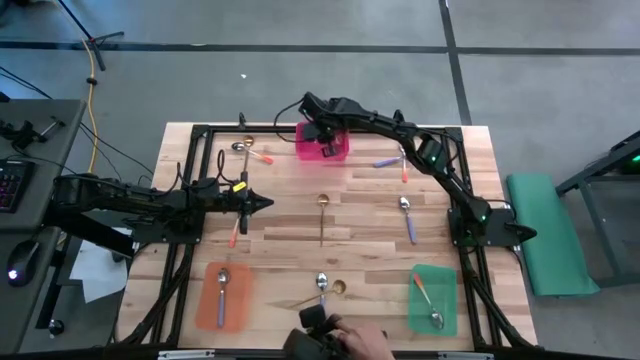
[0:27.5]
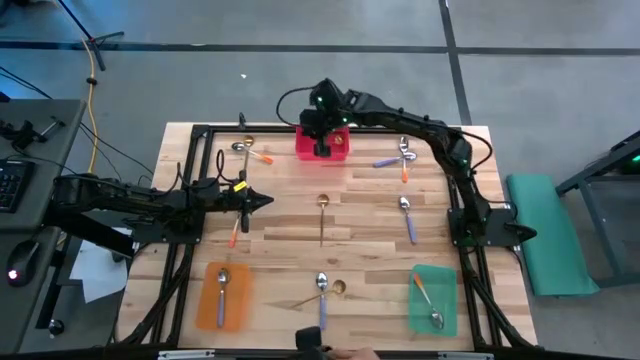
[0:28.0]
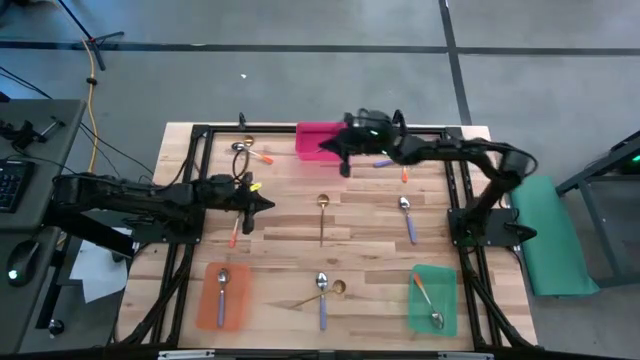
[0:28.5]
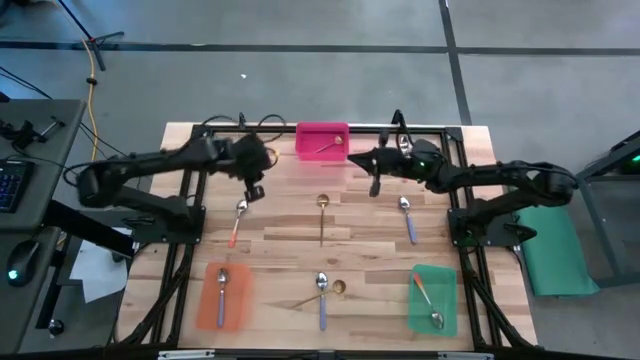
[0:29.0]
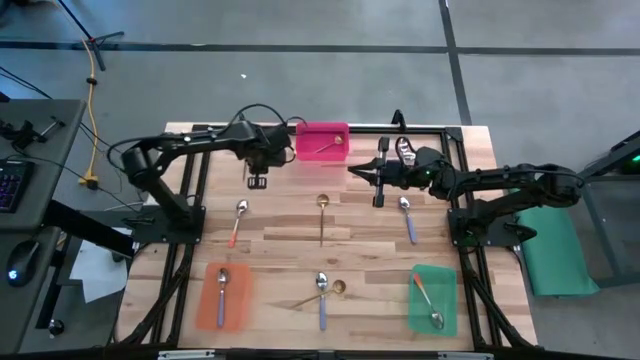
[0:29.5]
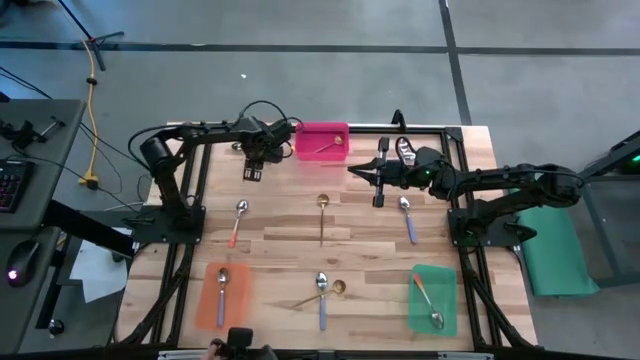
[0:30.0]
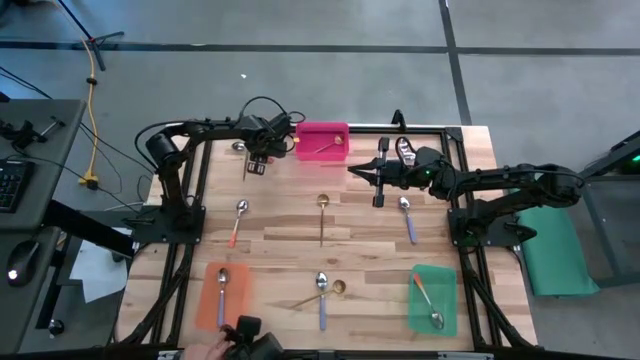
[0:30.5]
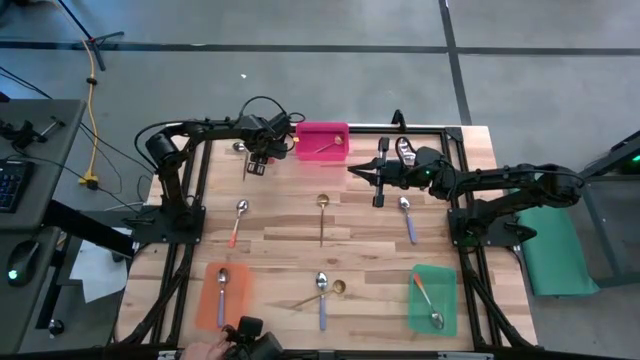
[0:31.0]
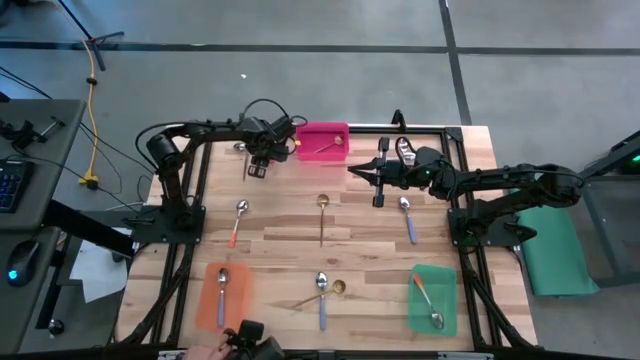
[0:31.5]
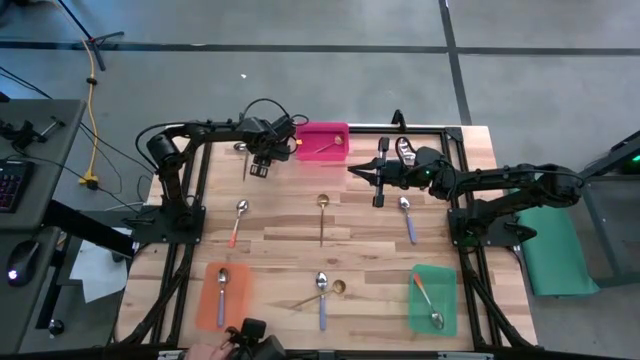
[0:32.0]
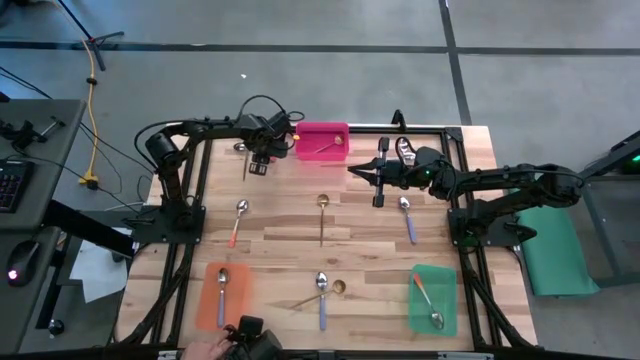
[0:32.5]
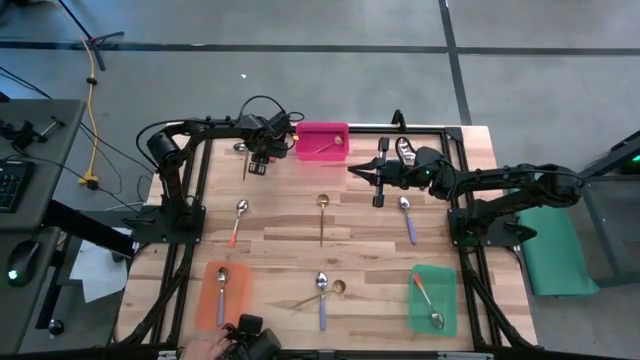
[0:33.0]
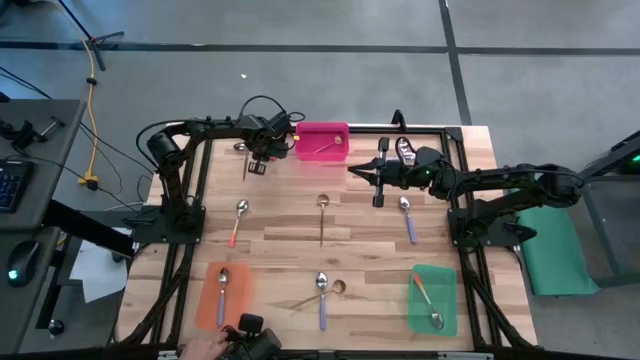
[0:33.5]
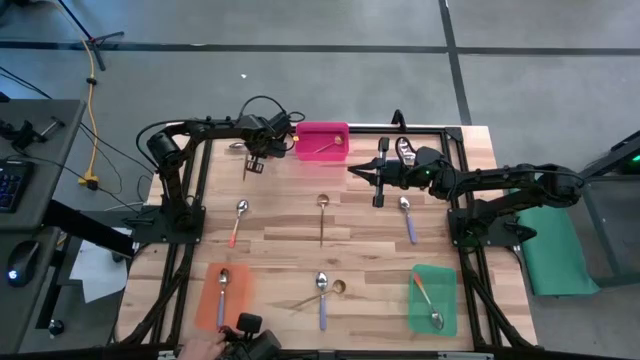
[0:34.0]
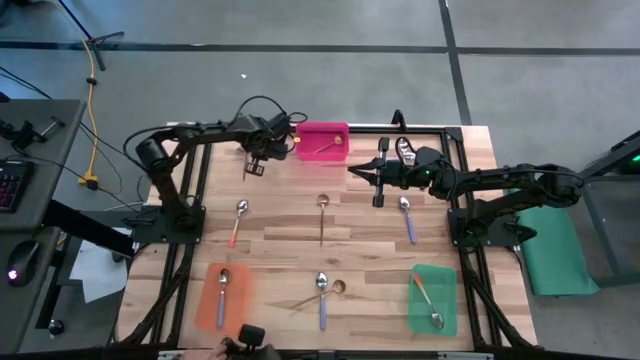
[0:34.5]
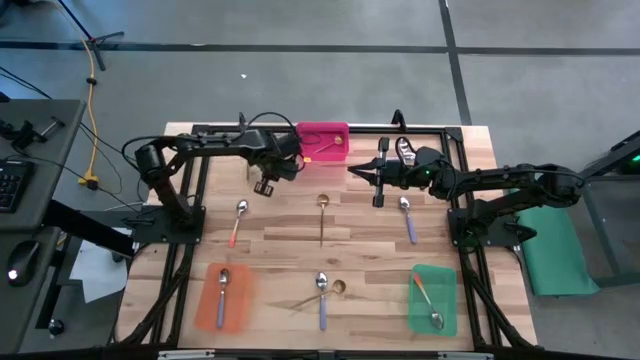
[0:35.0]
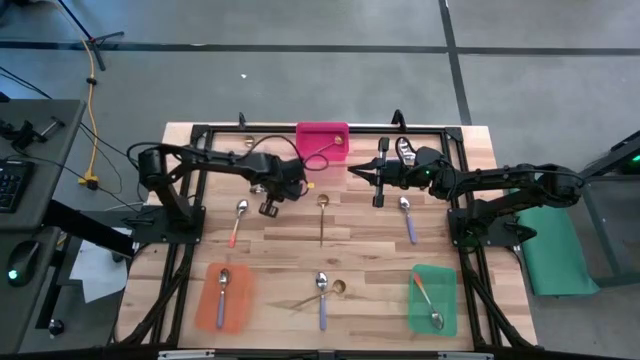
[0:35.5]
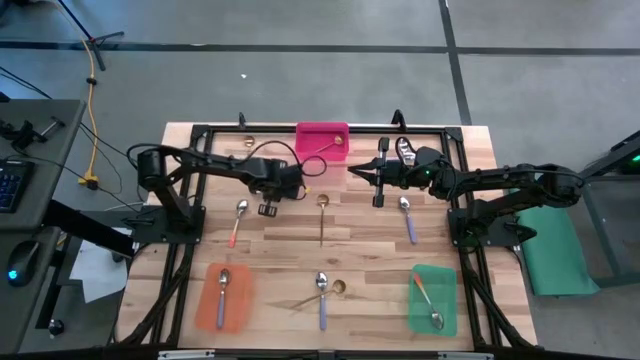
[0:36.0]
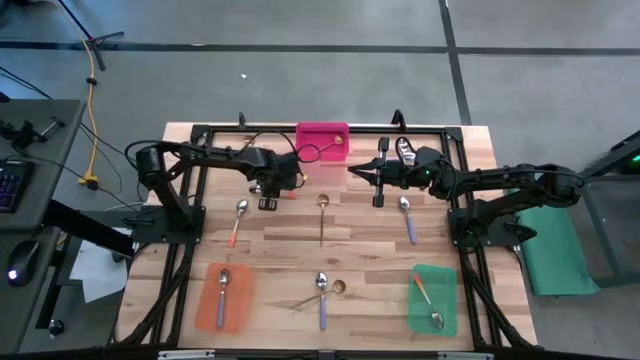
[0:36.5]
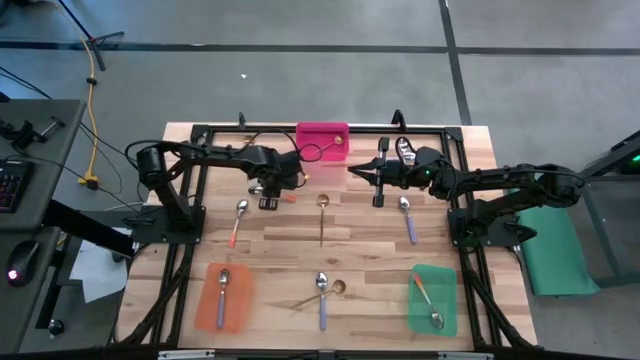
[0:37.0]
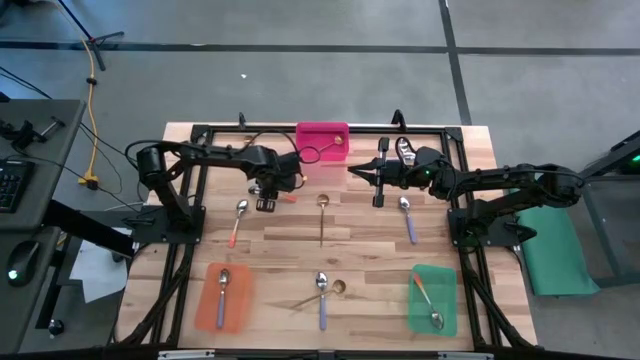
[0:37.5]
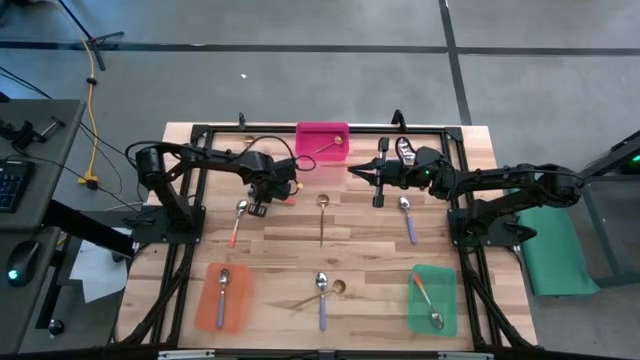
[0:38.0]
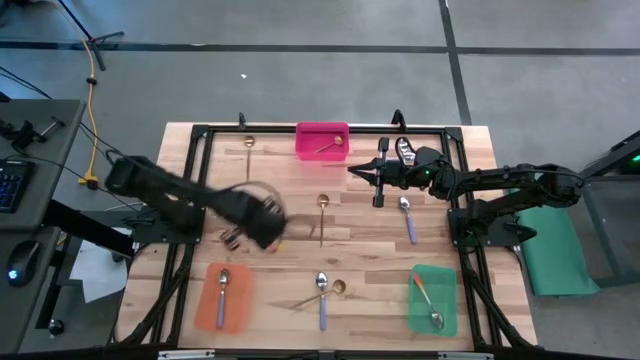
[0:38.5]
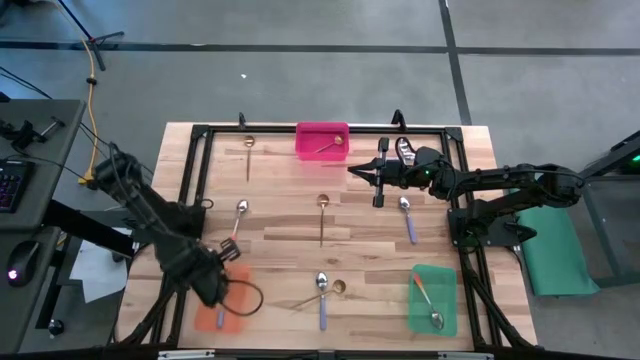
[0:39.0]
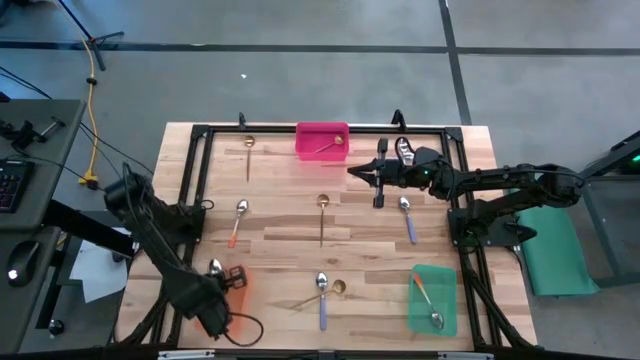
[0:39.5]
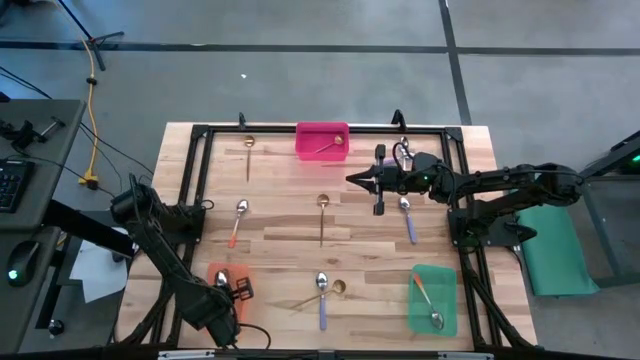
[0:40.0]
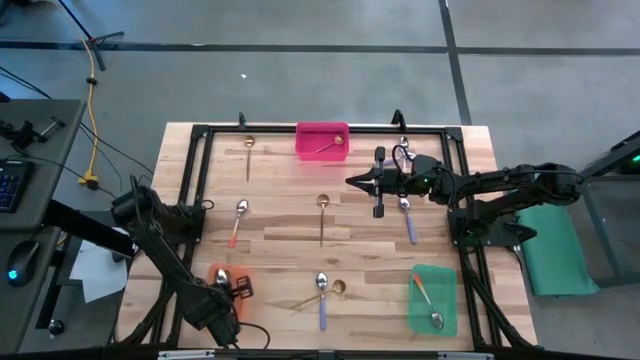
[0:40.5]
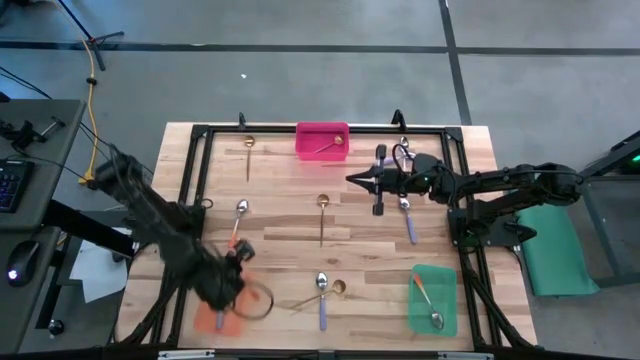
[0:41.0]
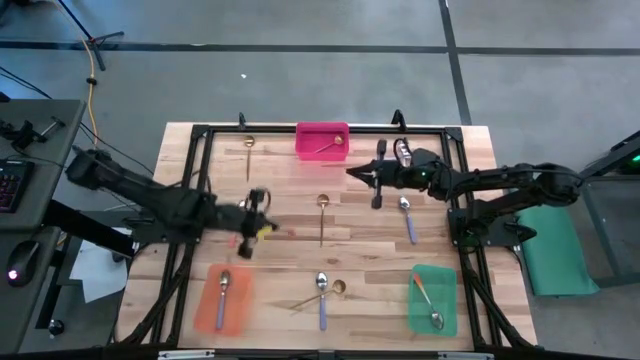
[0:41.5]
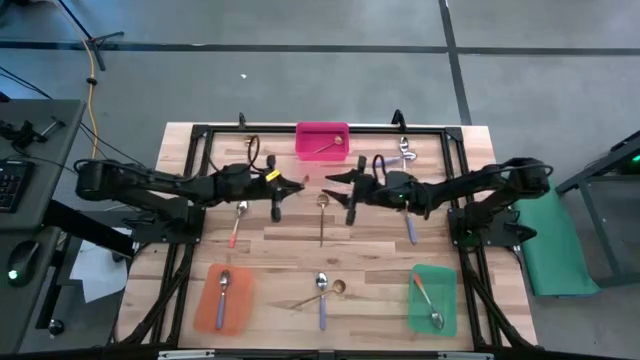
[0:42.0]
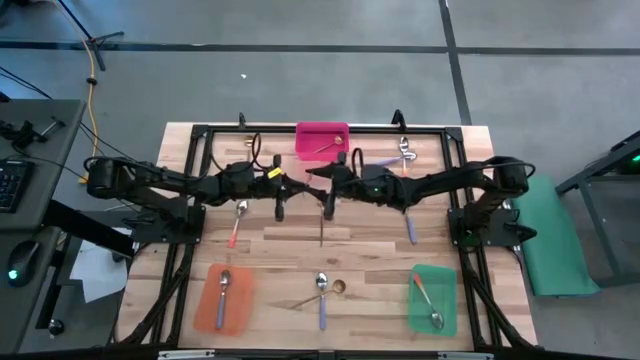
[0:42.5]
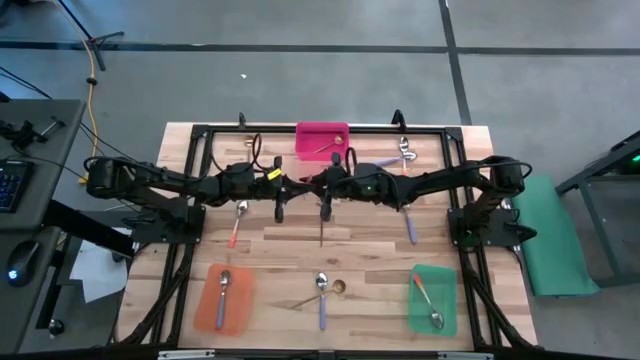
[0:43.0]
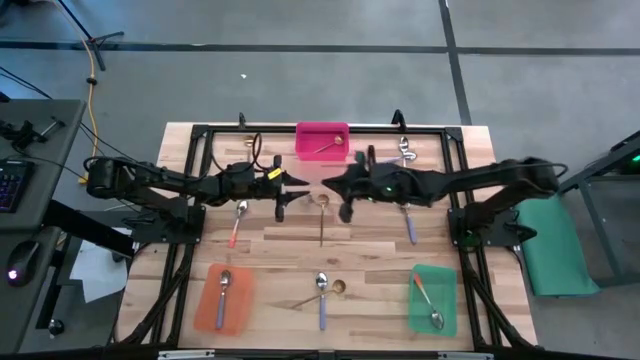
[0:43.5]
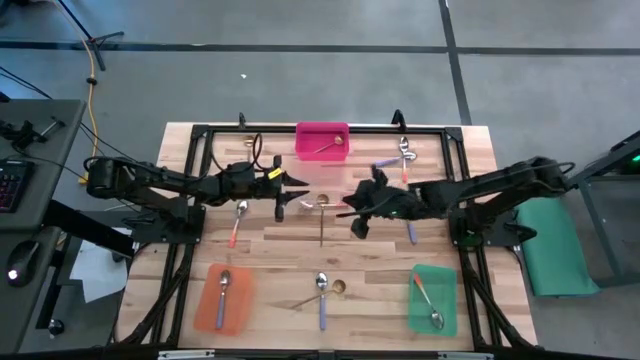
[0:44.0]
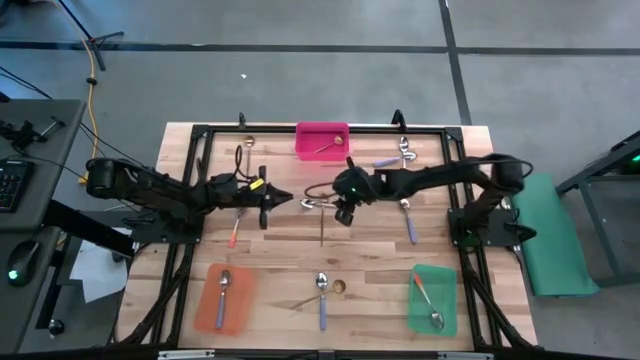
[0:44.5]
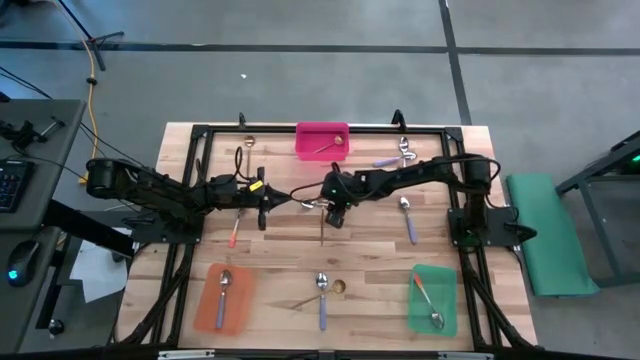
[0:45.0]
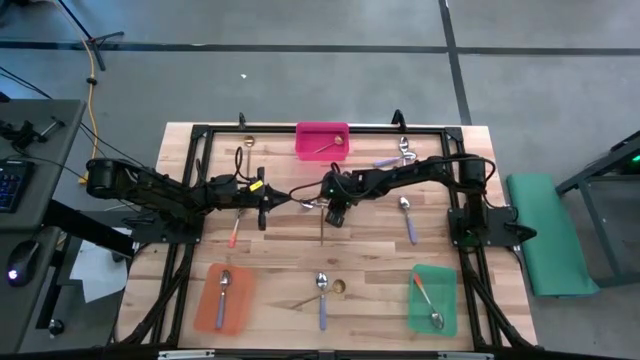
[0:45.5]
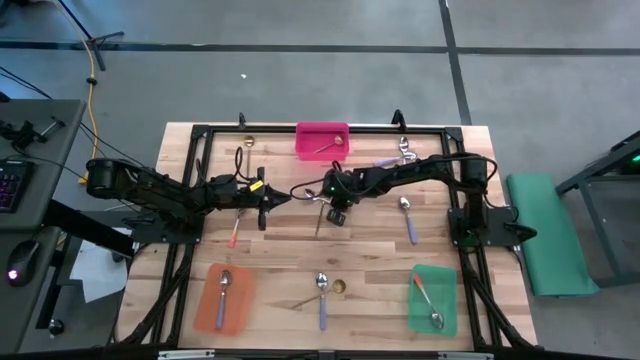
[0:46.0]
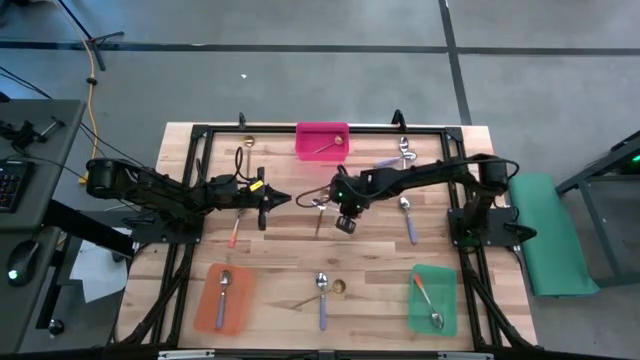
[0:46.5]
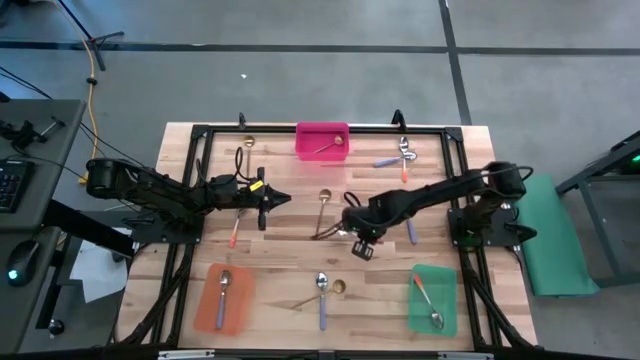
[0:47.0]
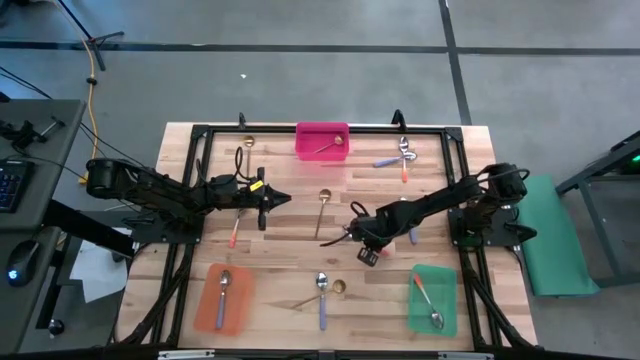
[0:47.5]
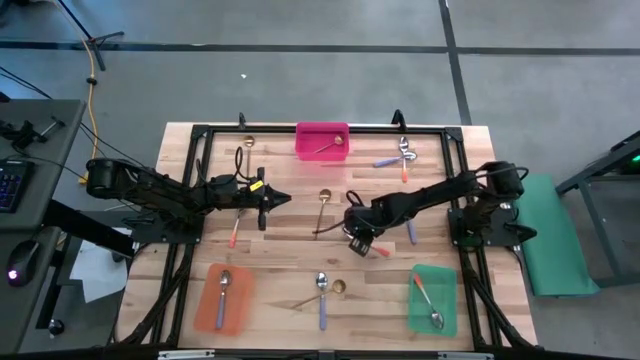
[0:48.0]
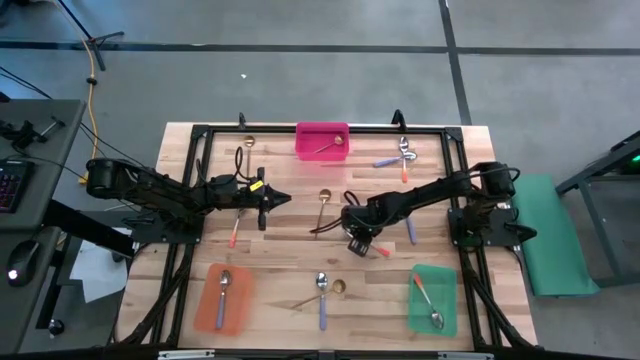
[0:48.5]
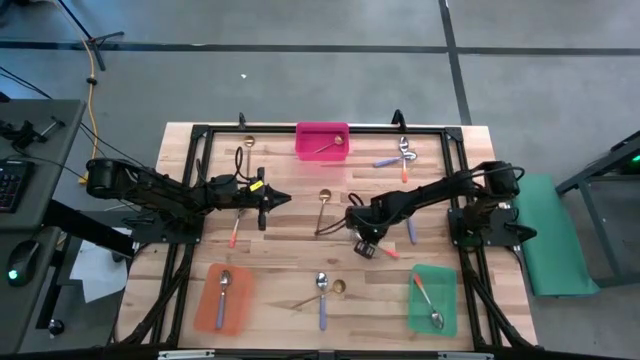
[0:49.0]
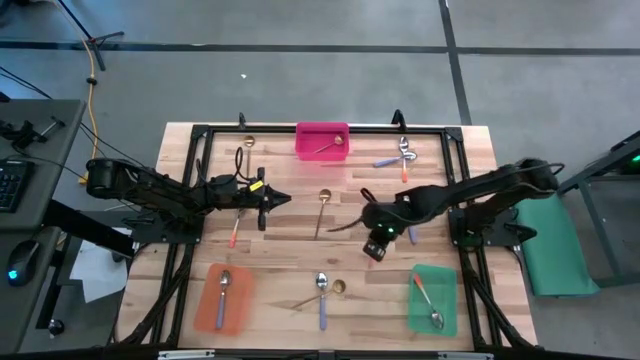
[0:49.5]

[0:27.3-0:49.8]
Task: Sort silverware by color (type)
Put the orange spoon into the green bin
